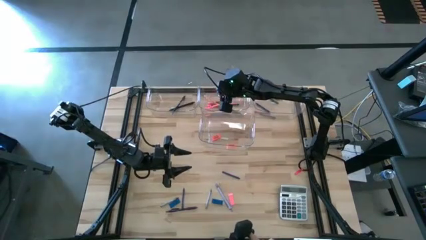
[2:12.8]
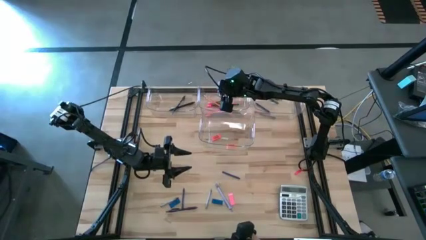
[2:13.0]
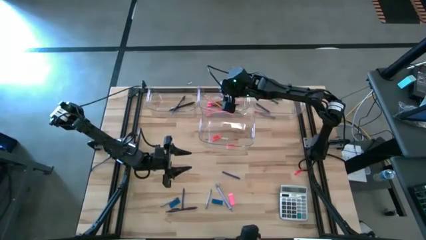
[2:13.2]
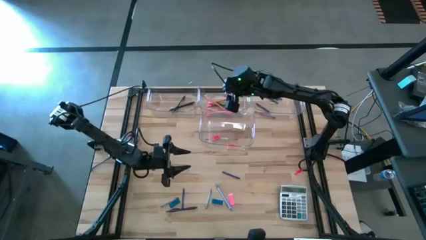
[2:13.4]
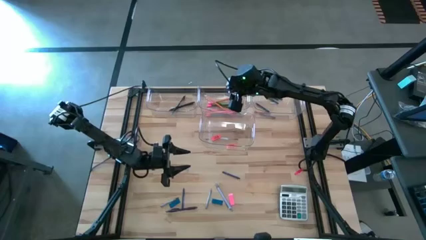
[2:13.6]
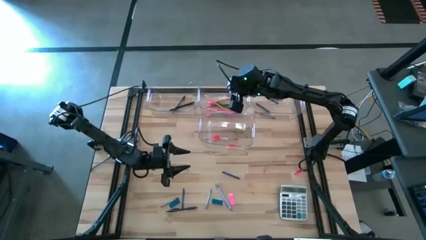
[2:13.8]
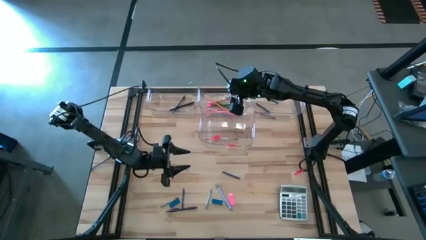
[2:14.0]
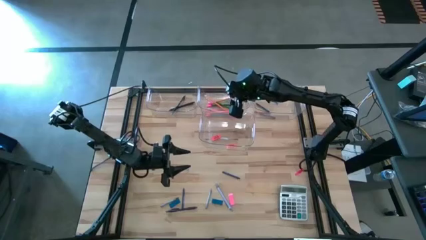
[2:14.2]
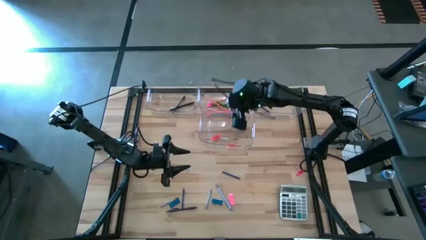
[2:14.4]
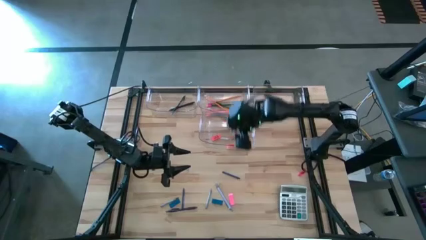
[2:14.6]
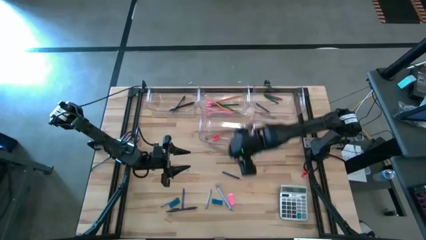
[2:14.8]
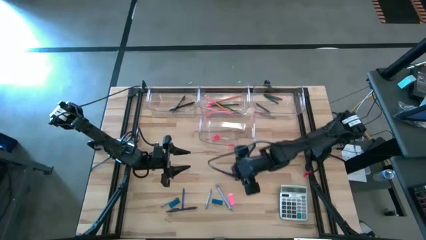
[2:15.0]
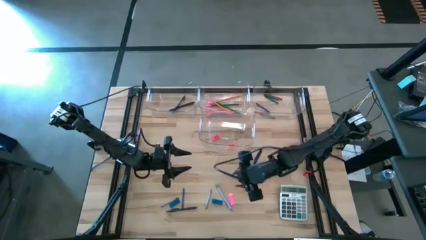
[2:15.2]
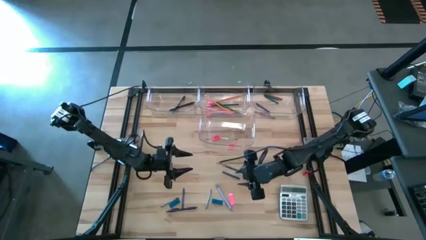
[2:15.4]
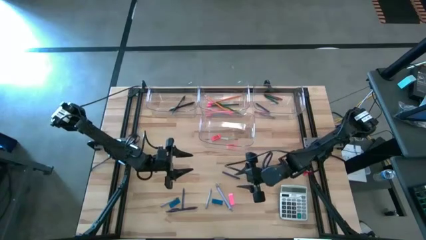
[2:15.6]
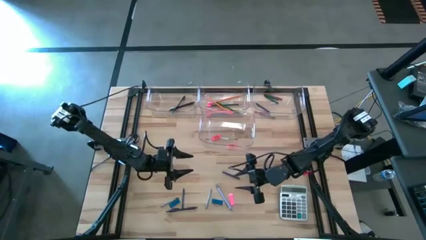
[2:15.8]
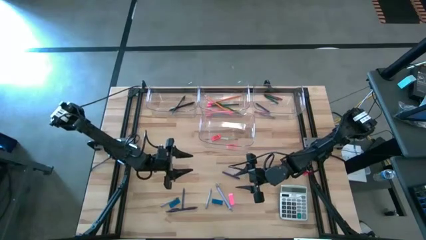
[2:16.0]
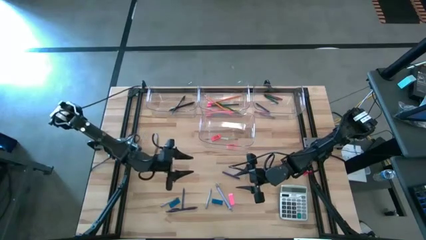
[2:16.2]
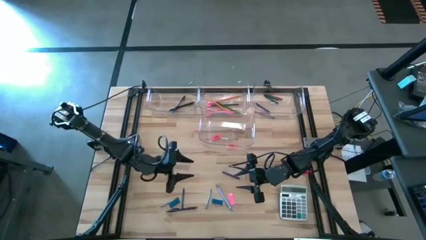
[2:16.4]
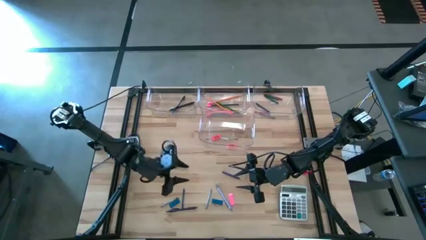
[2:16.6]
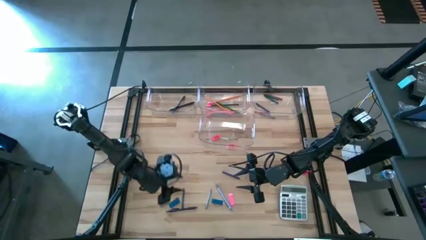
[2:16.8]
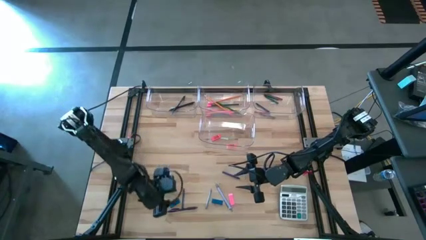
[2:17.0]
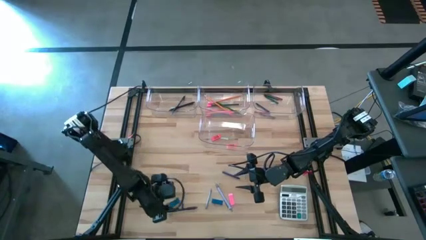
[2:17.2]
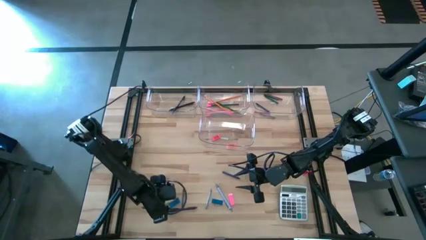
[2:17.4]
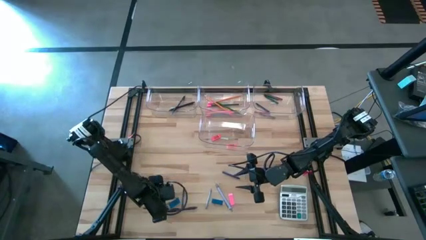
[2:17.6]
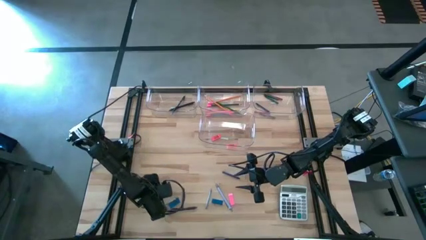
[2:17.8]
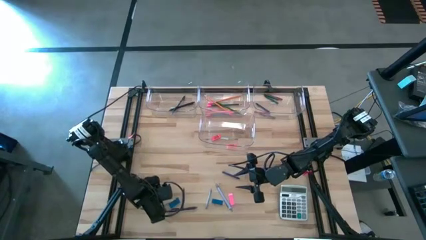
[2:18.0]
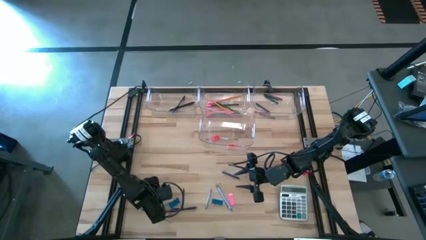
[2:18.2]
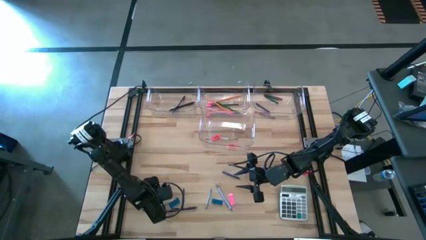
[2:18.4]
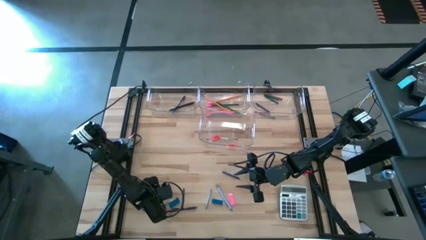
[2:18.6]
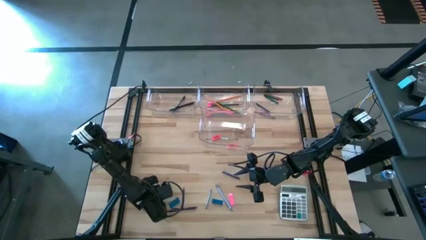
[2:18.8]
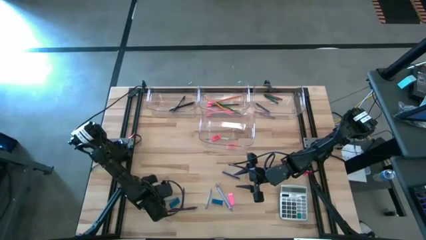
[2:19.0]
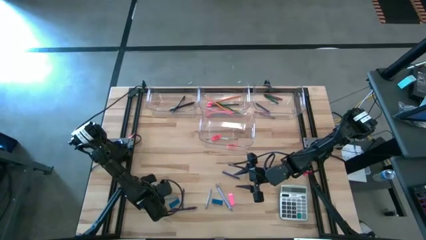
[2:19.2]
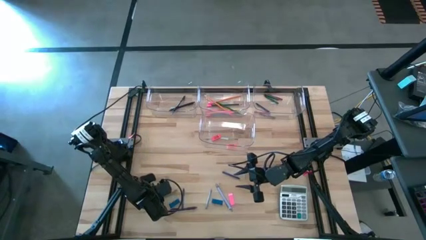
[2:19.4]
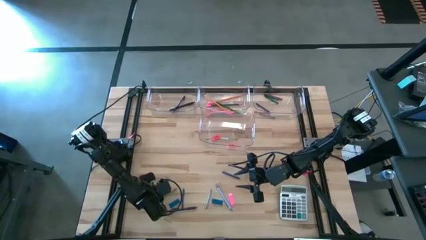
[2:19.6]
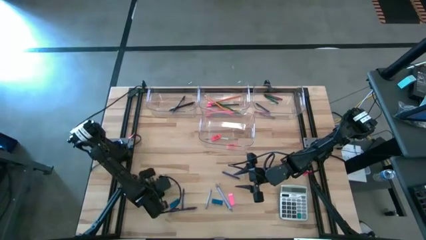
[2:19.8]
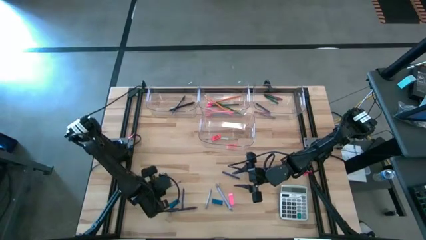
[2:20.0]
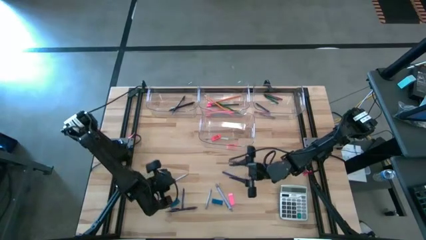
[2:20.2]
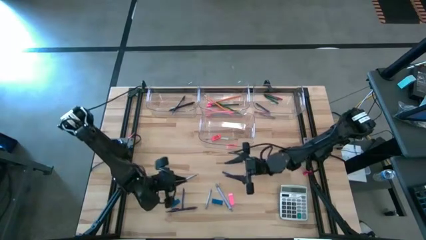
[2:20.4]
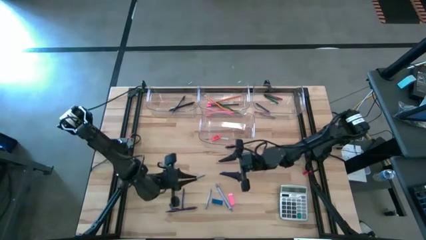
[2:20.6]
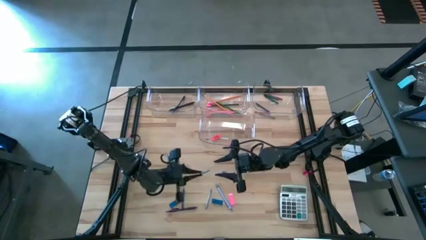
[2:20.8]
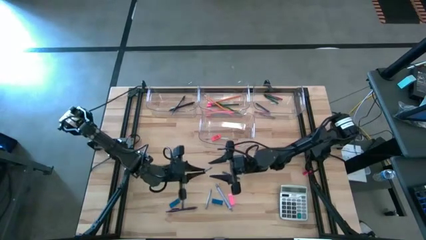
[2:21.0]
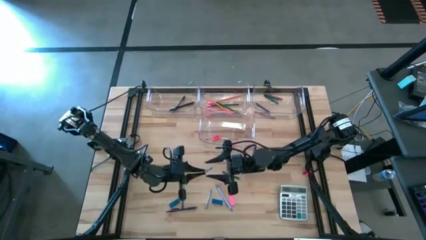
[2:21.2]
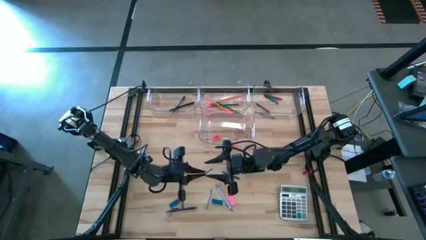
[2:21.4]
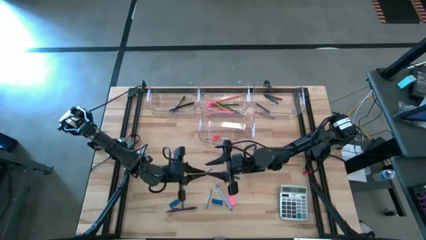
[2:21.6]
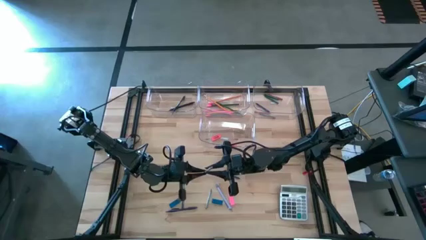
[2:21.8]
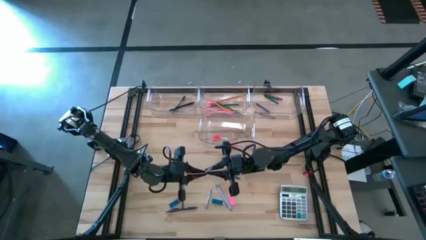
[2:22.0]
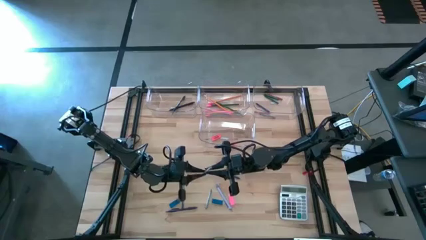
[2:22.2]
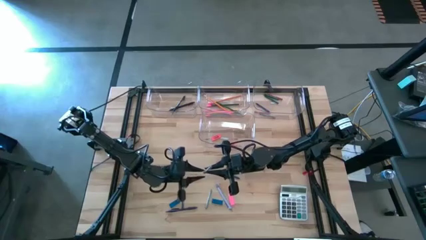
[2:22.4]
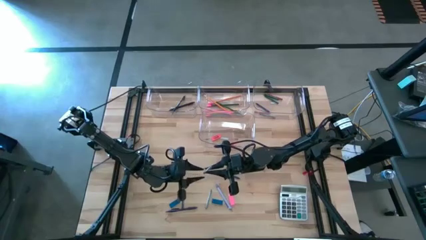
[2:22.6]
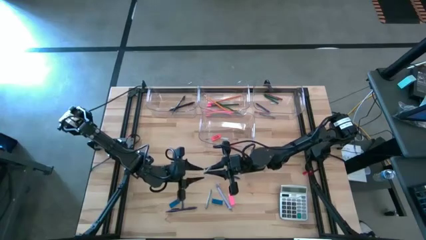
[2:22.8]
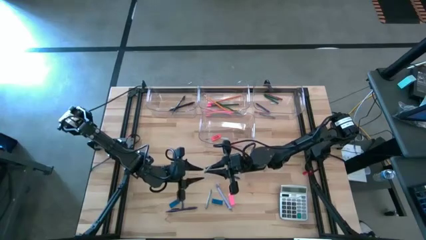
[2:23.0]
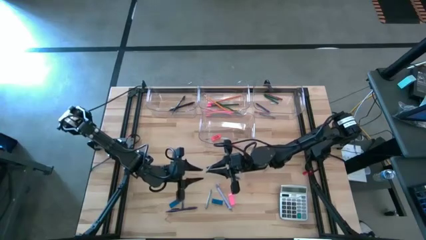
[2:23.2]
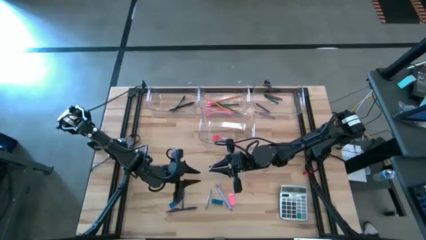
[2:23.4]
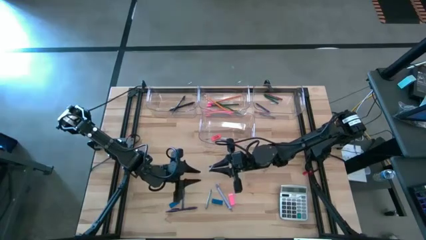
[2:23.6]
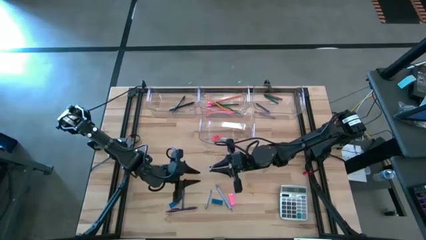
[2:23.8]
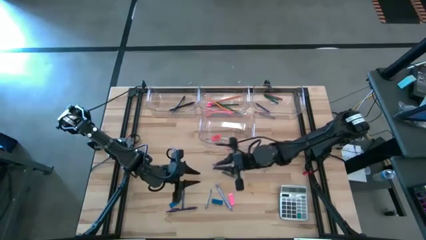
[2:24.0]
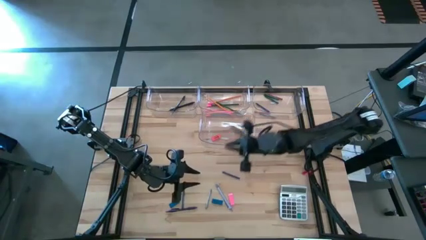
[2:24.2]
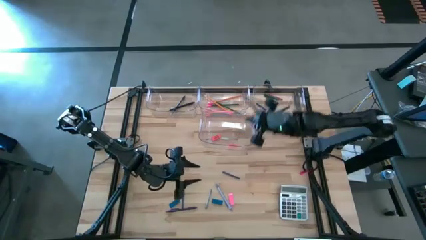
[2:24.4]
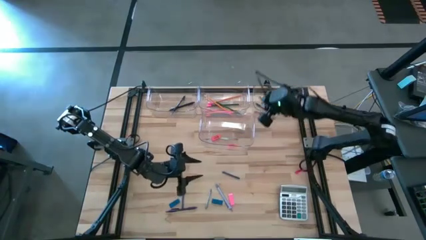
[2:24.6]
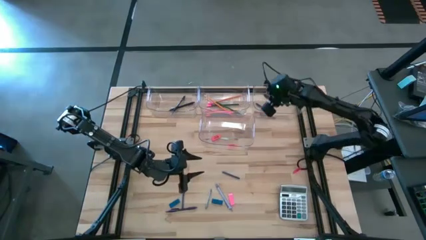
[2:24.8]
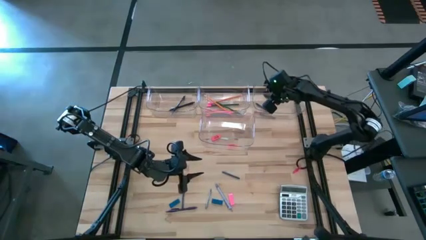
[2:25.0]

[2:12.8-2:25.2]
Task: Sort crayons/erasers/pens/pencils in bins
Put the gray crayon into the top right transparent bin

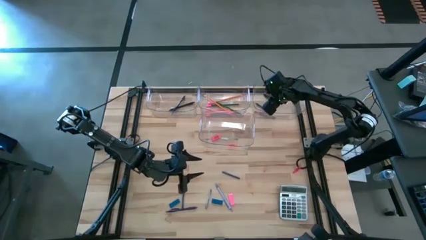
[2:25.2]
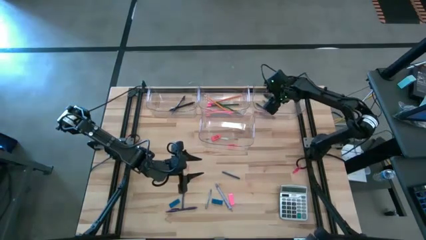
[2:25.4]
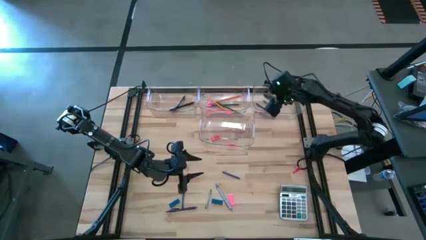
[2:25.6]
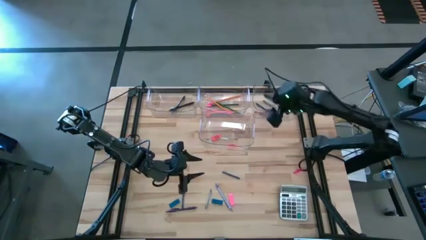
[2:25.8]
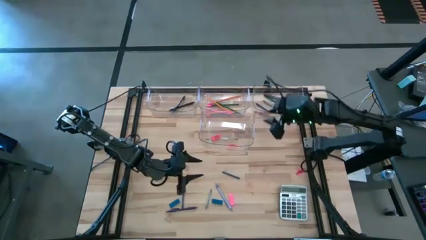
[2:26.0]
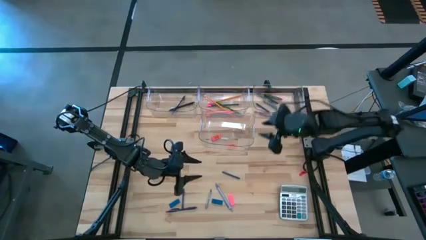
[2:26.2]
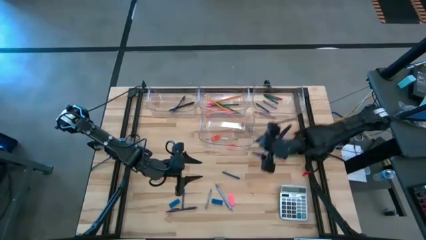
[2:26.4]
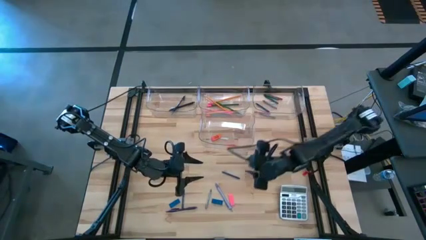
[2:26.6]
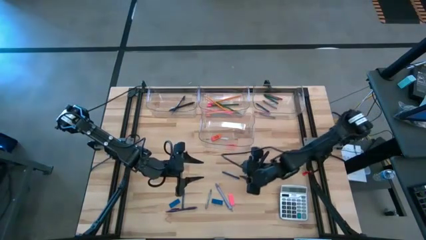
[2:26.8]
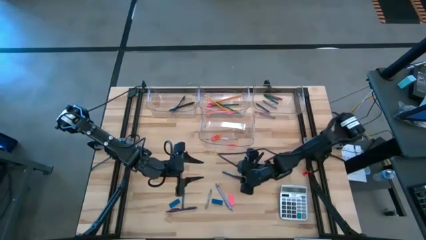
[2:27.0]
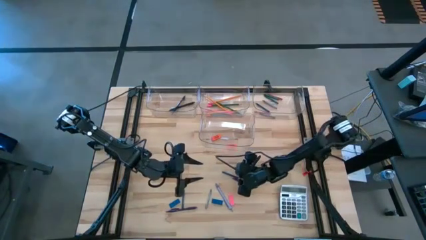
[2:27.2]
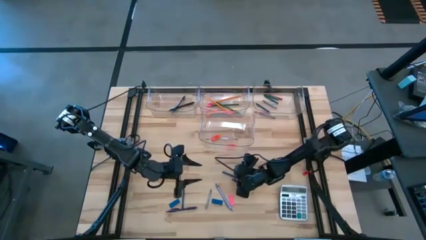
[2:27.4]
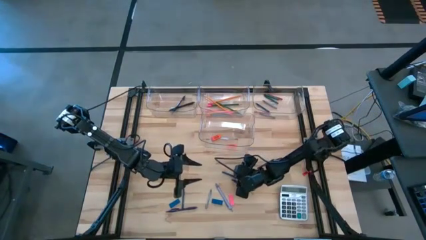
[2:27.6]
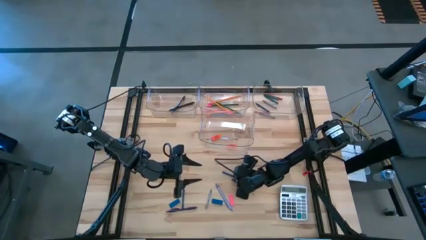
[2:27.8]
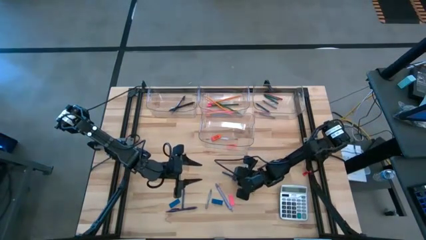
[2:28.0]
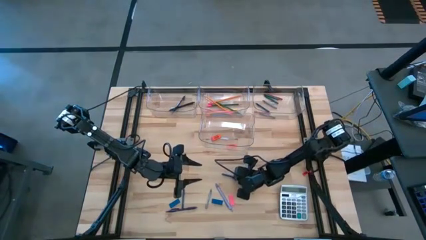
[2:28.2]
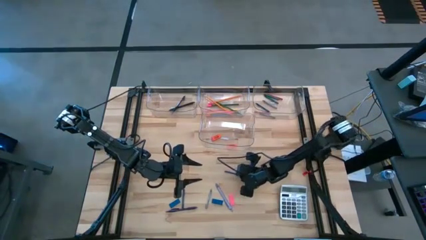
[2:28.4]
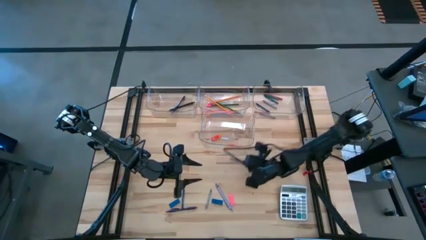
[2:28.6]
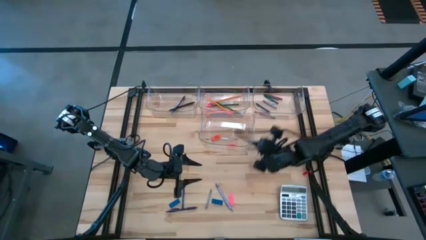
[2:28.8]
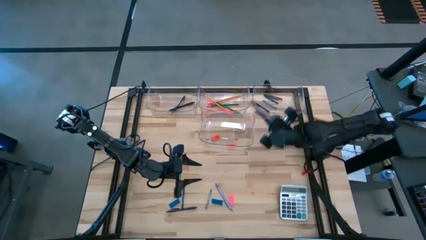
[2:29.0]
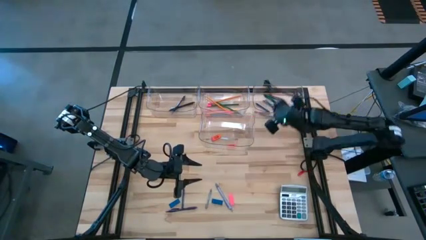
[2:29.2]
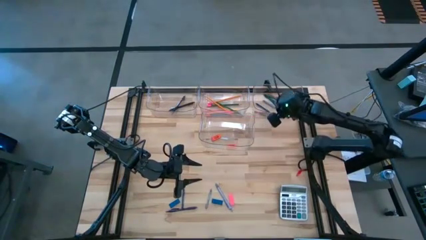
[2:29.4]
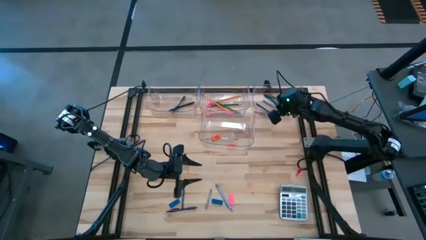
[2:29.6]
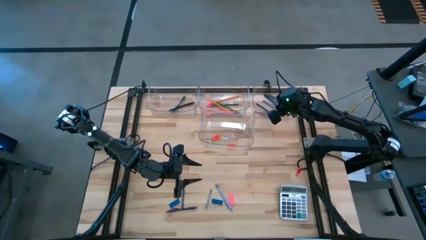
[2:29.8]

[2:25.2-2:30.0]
Put the blue crayon into the top right transparent bin
